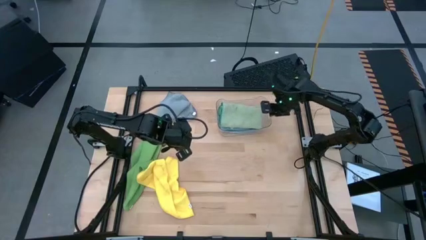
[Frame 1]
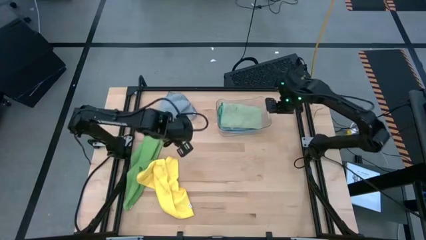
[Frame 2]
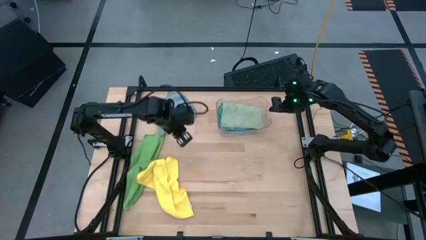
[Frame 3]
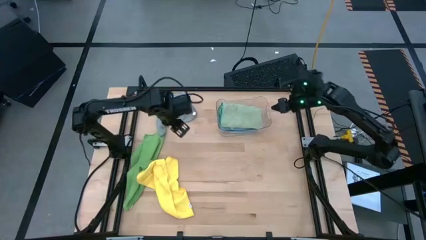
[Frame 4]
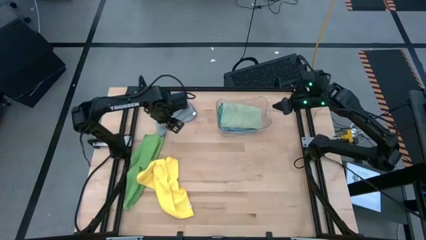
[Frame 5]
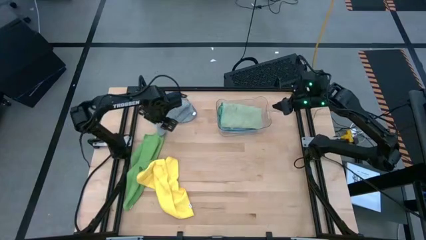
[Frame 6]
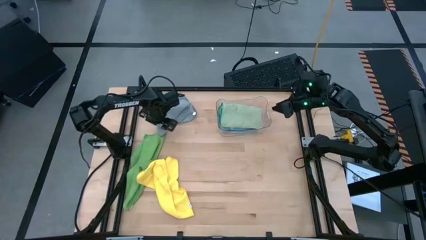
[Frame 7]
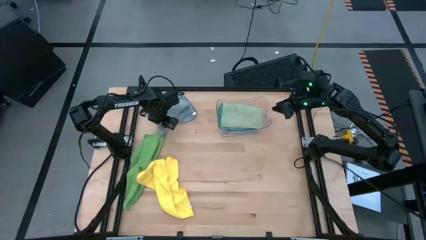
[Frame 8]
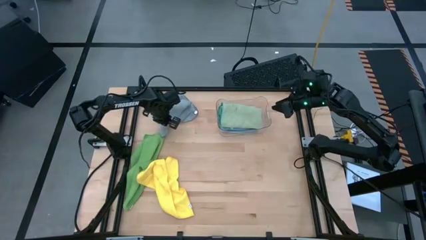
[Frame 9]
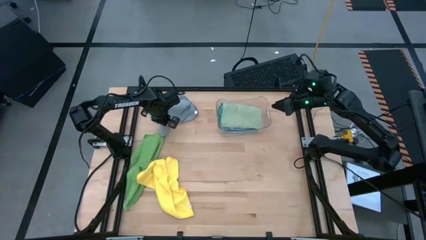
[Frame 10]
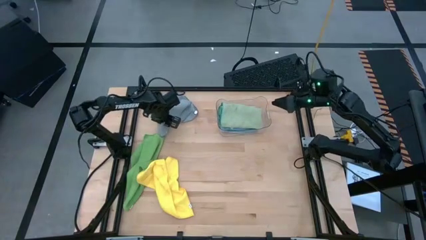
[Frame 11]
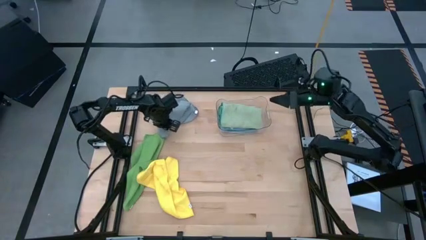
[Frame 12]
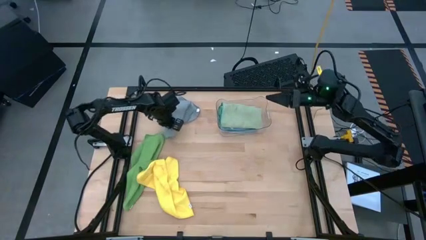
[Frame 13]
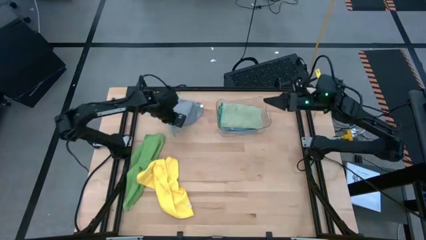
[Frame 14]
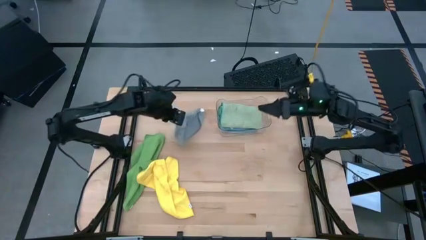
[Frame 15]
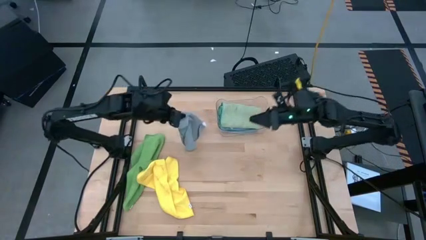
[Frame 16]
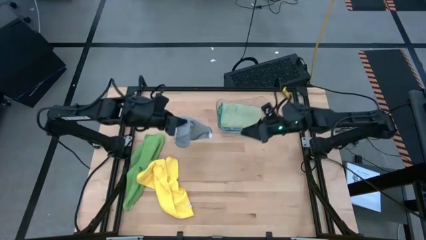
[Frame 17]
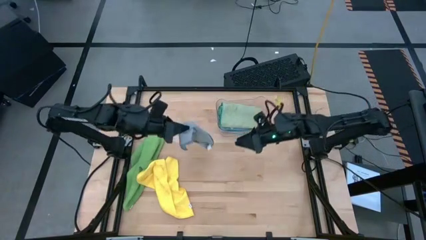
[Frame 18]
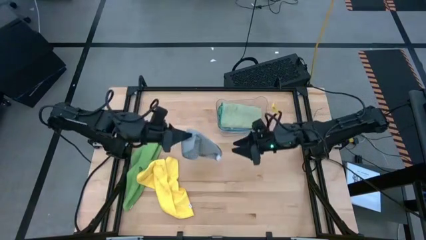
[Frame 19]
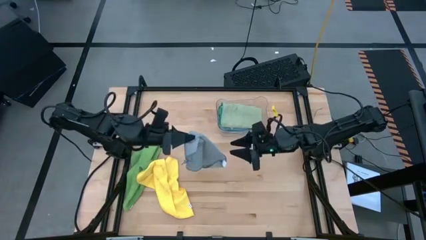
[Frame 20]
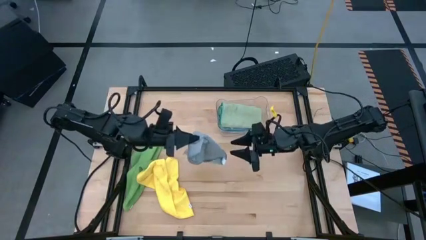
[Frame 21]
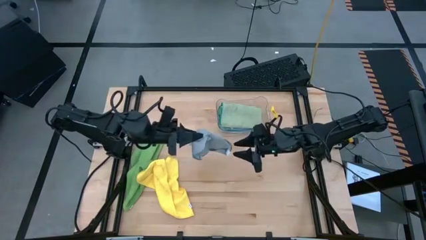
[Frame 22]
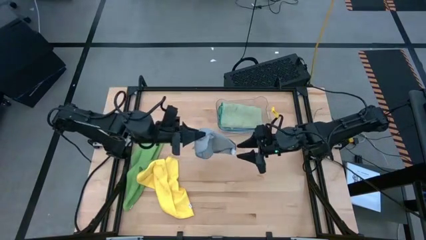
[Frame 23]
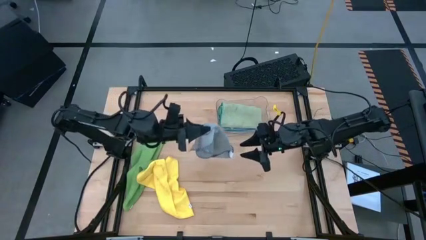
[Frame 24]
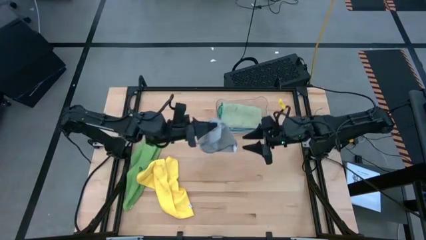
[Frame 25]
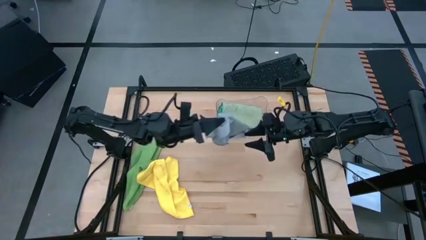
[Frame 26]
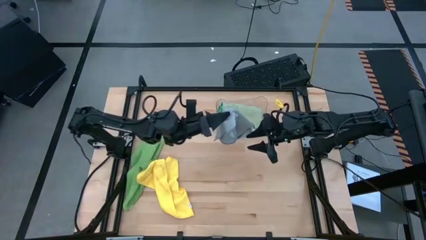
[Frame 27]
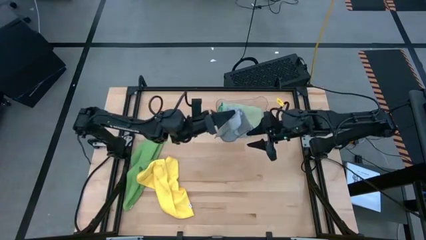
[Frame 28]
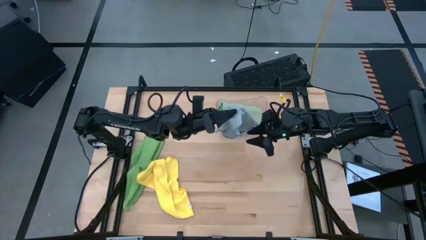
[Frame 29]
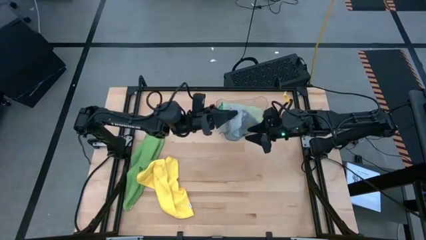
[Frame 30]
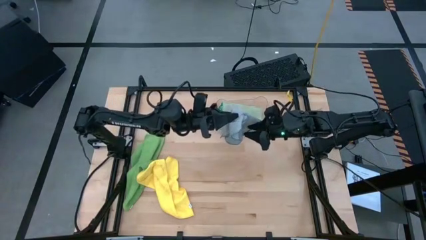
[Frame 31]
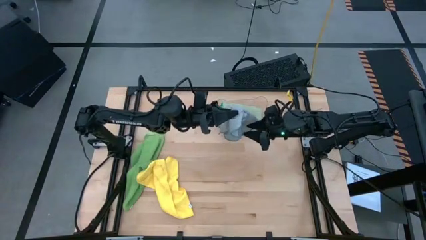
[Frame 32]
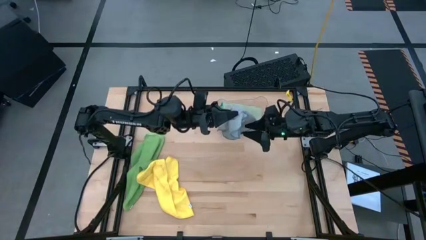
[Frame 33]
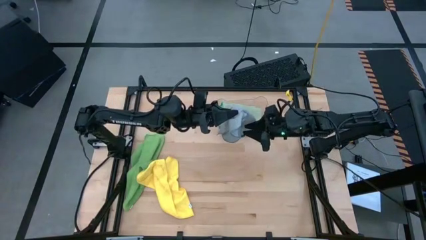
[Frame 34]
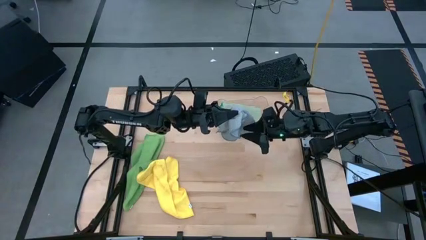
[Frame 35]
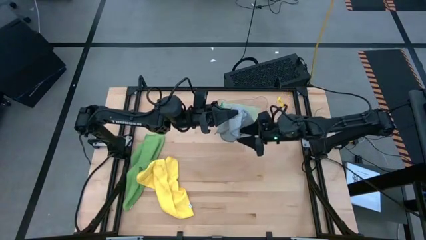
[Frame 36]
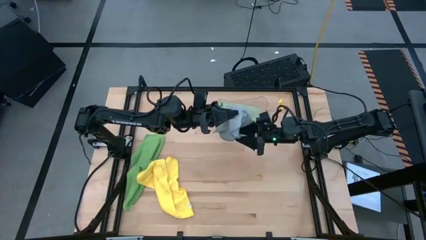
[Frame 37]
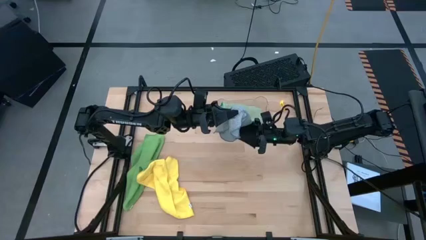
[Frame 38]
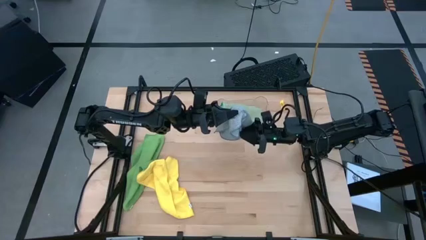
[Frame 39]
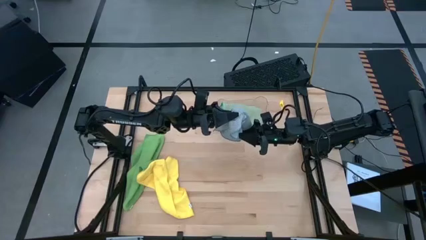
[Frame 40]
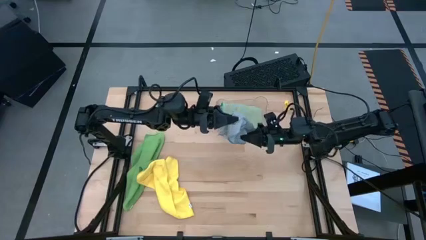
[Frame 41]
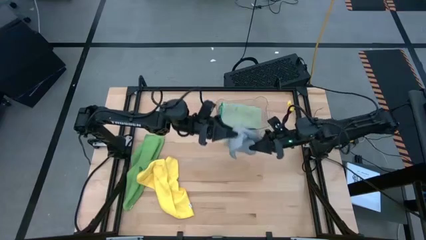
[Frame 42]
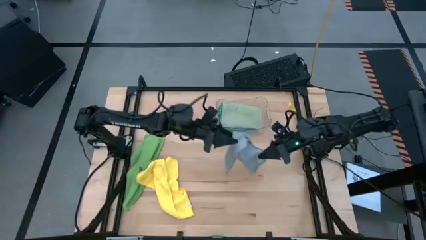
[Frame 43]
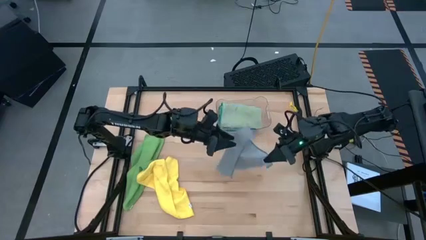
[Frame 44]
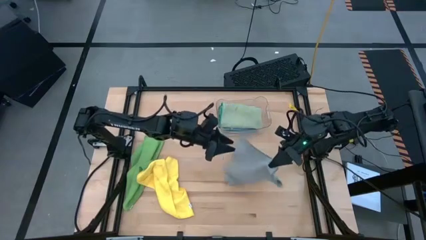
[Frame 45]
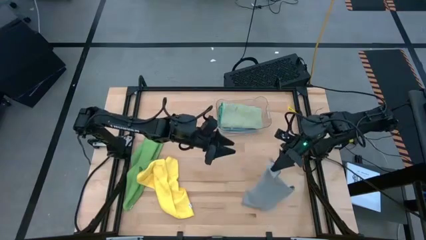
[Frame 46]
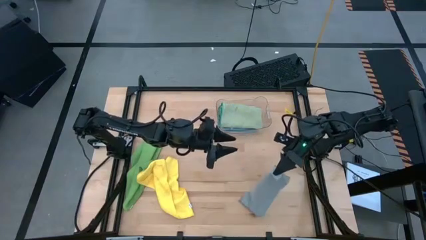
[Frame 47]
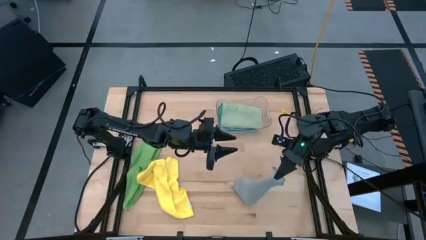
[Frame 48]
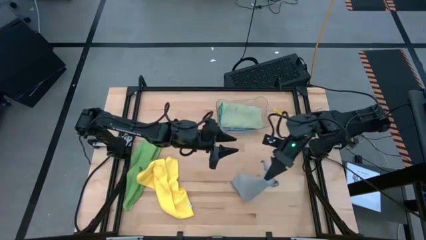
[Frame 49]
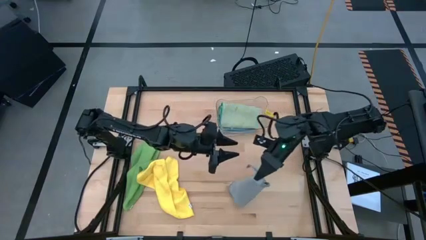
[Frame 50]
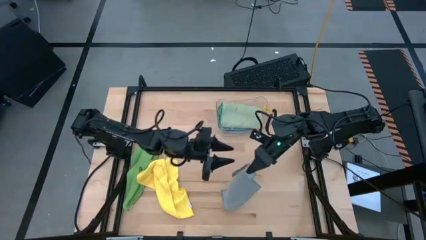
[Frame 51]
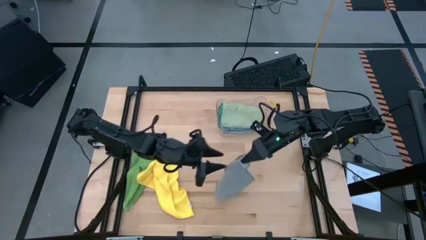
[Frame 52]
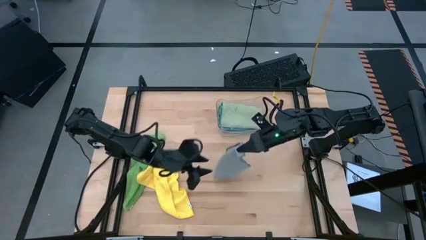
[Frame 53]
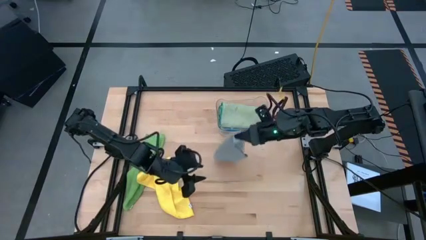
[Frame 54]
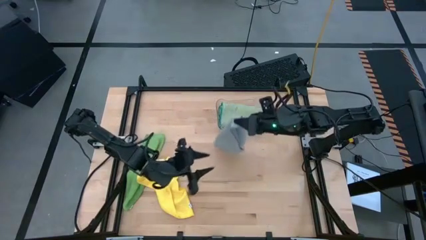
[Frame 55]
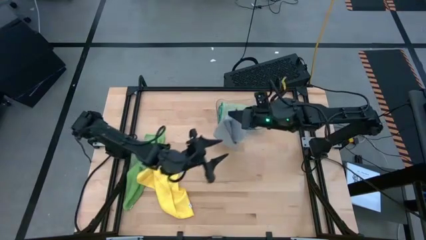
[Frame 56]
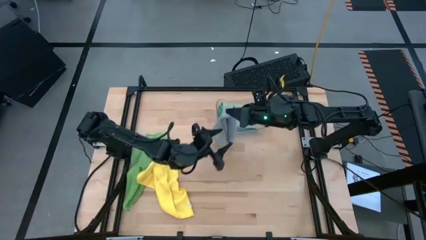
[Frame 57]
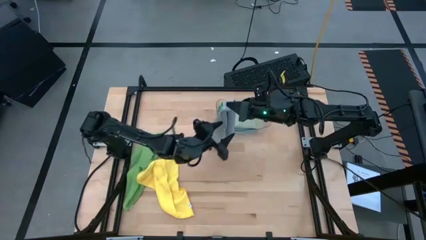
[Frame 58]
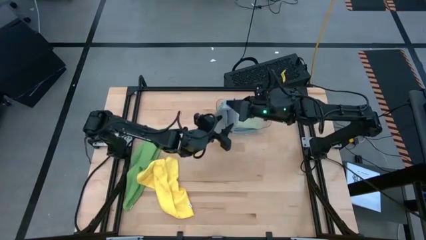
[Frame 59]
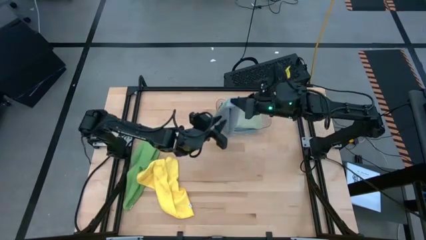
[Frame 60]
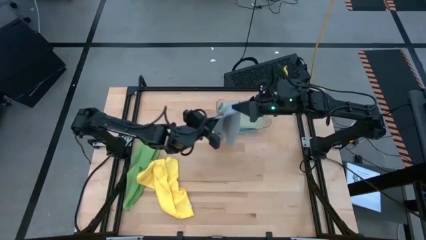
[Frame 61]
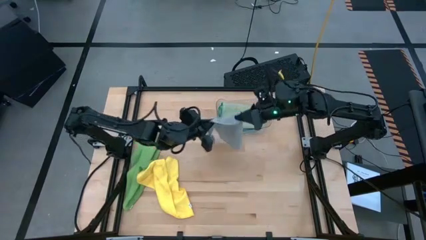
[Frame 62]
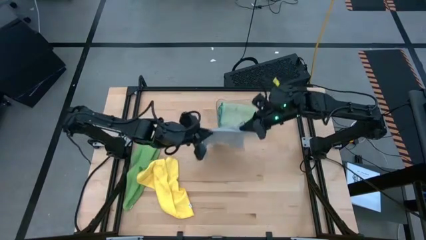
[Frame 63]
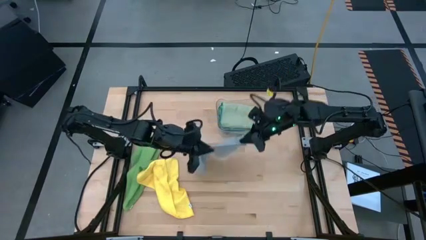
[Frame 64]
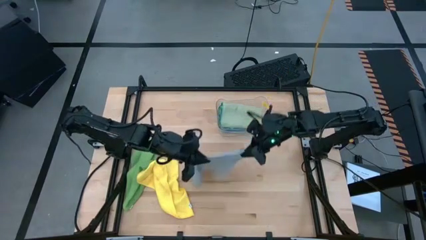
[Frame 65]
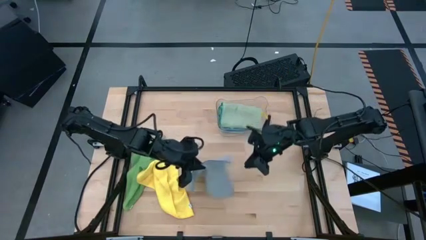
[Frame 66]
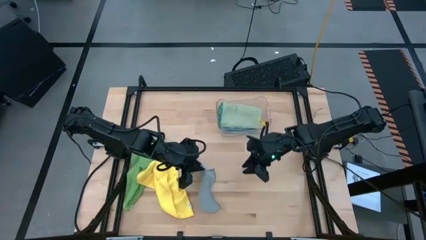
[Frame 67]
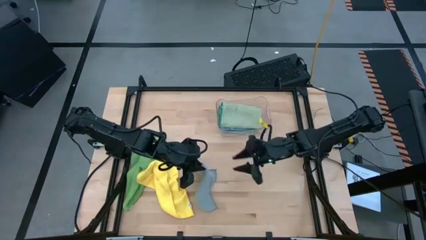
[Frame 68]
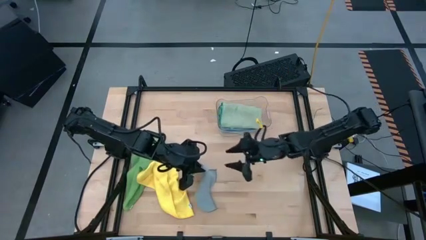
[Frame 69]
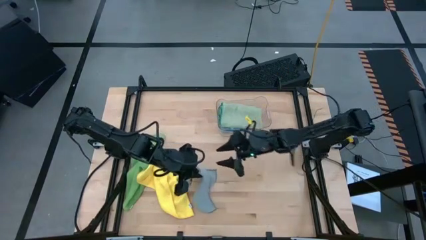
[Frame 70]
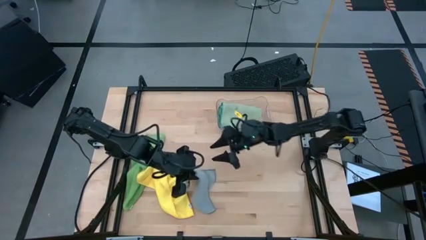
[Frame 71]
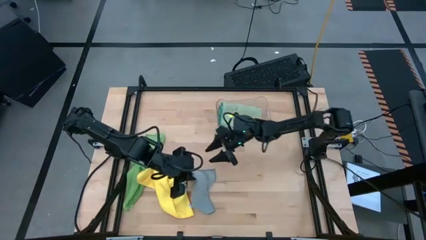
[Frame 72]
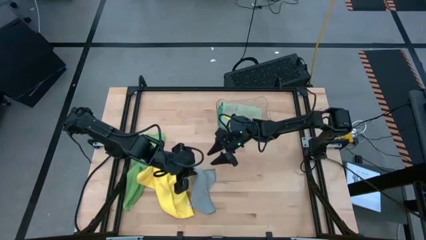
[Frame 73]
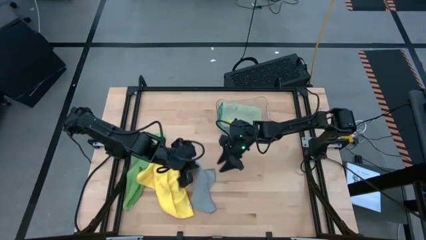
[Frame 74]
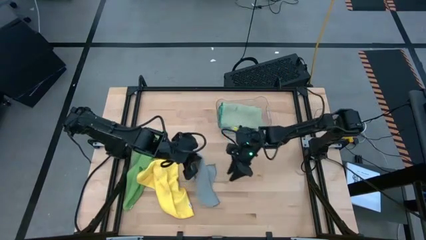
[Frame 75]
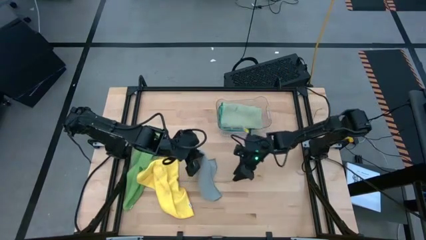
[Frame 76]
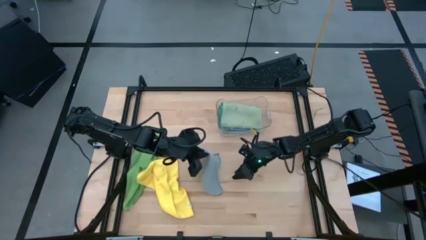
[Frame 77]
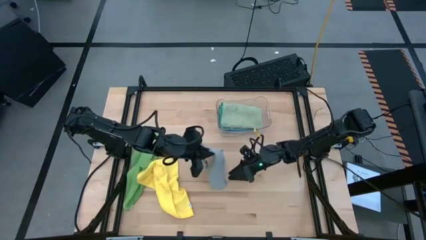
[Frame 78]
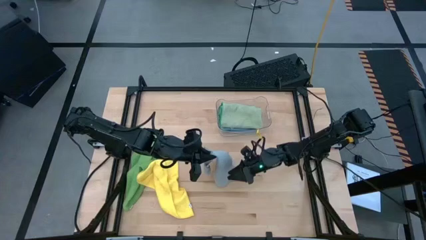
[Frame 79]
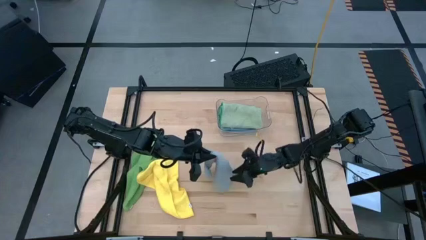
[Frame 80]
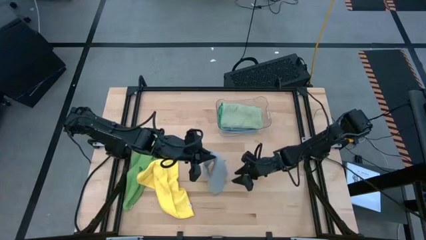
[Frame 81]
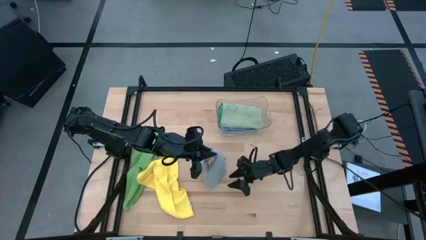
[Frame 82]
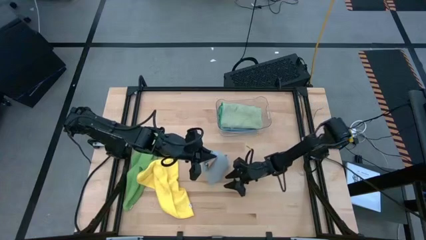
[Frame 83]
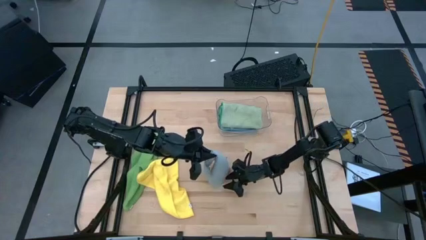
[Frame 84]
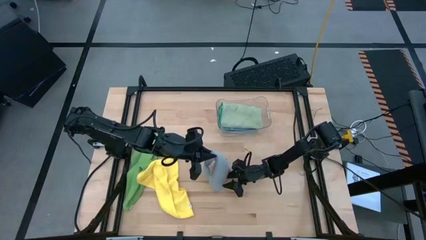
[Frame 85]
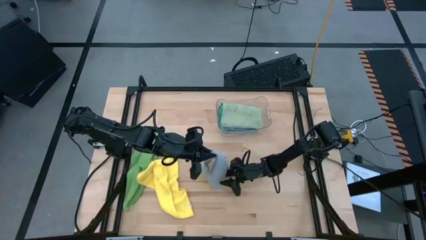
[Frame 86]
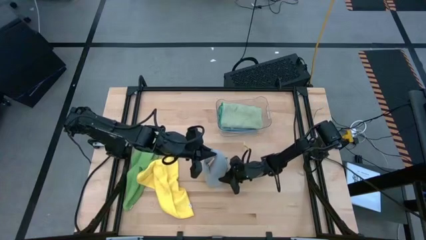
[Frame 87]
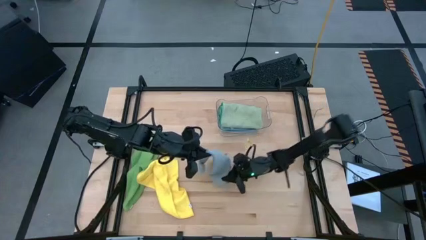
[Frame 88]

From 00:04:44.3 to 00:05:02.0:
Task: Fold microfiber towels
Fold the gray towel
